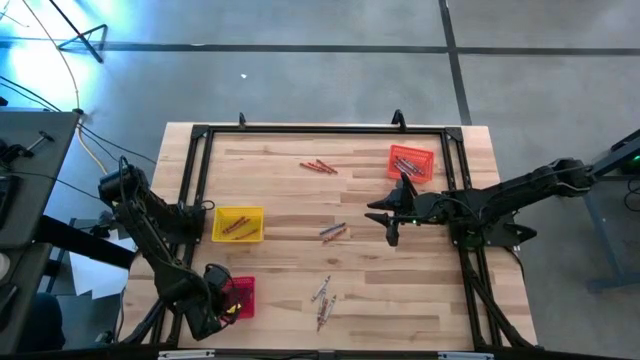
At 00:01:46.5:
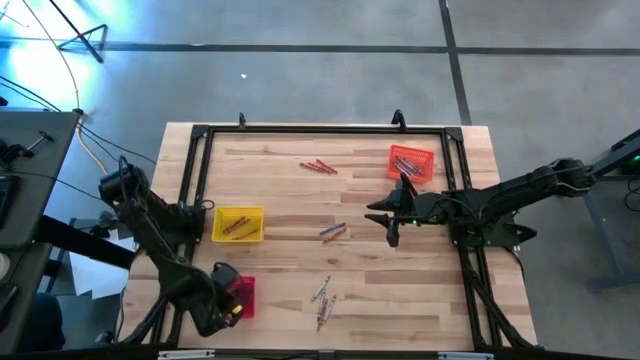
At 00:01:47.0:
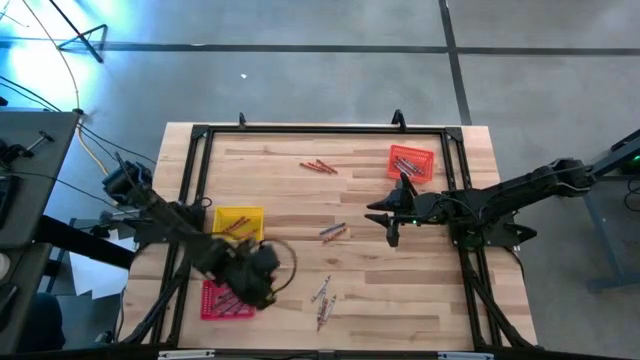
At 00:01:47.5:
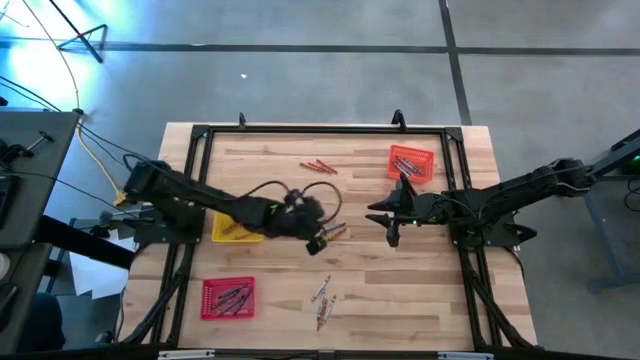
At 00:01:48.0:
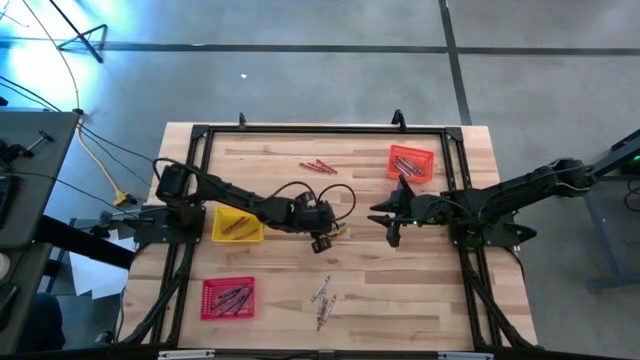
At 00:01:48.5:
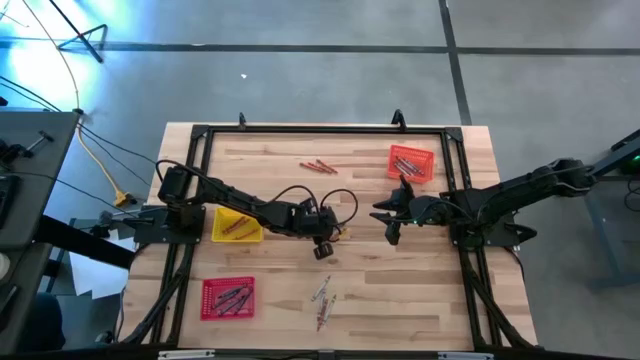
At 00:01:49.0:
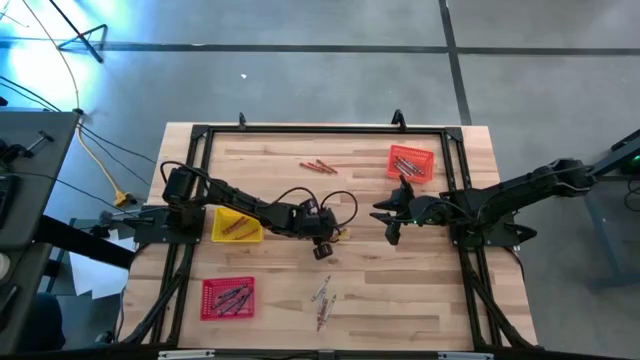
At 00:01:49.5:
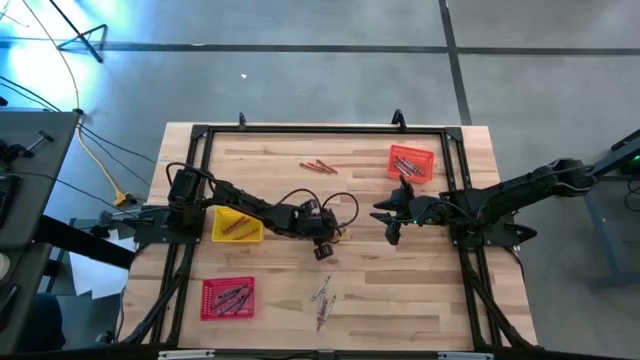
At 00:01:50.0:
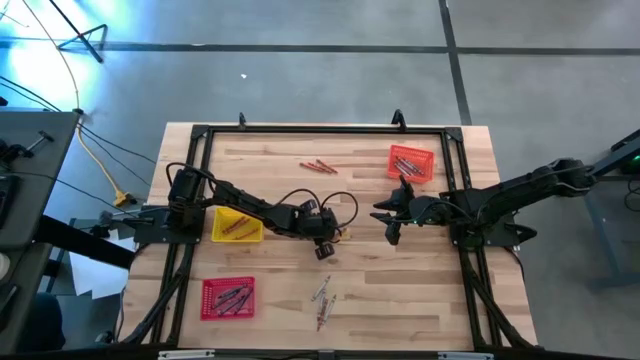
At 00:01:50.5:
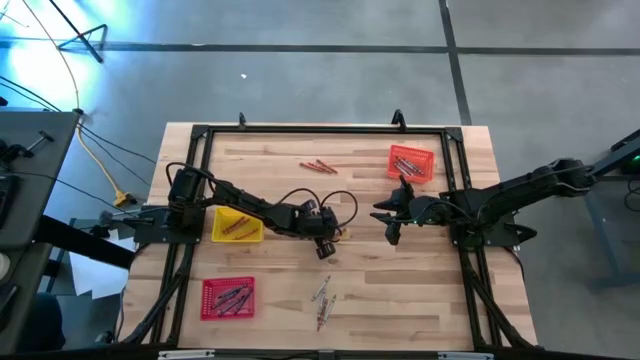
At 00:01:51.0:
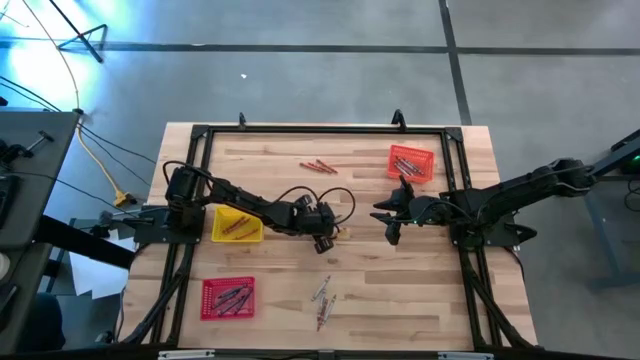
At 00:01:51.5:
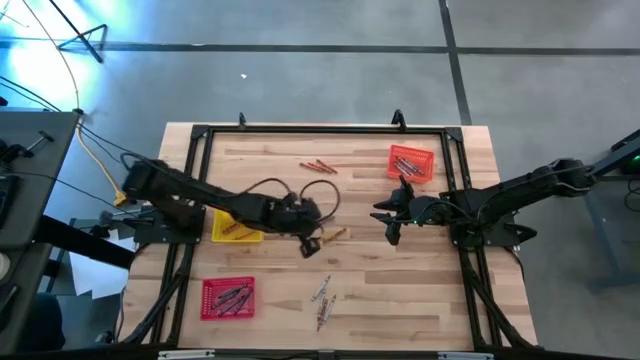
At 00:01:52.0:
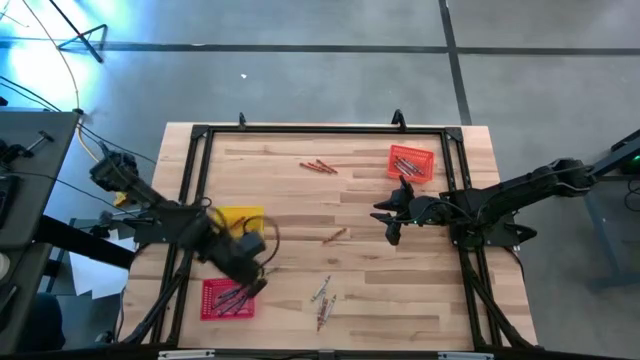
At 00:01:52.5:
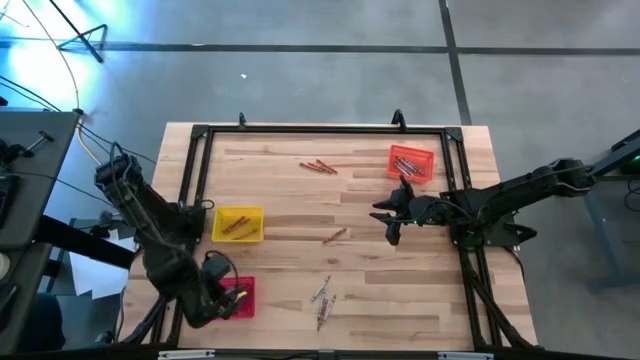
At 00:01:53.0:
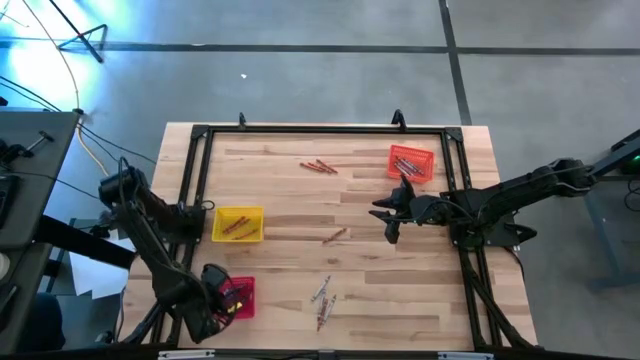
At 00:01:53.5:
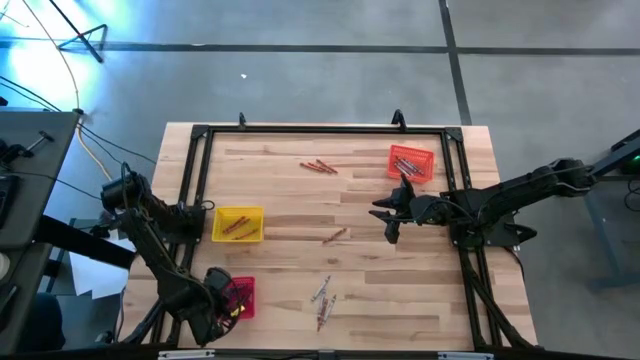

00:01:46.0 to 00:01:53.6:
Task: Sort crayons
Put the blue crayon into the red bin

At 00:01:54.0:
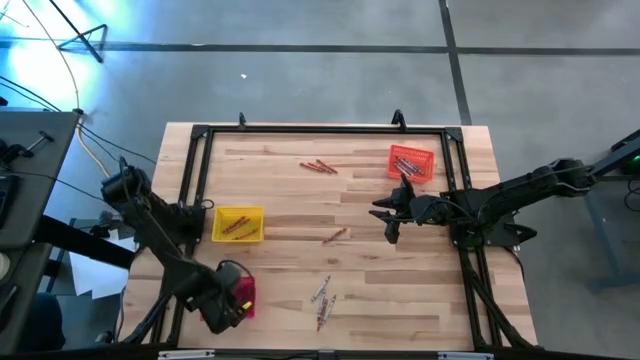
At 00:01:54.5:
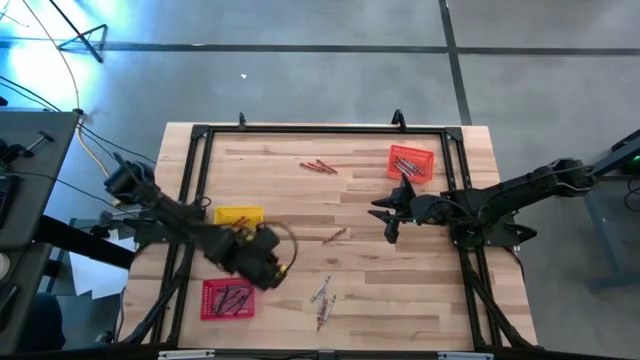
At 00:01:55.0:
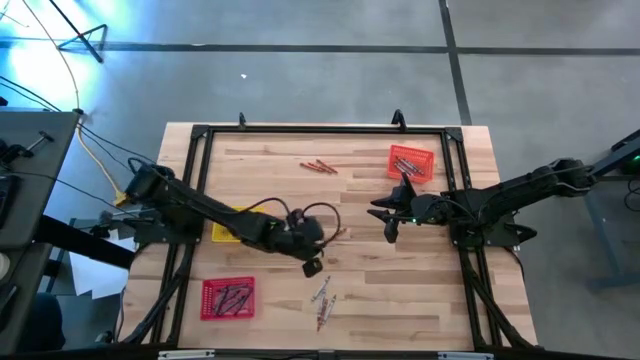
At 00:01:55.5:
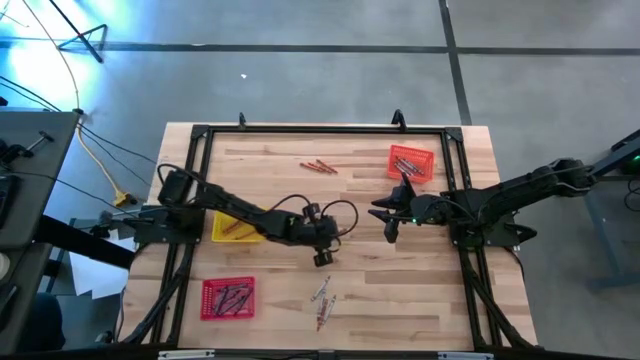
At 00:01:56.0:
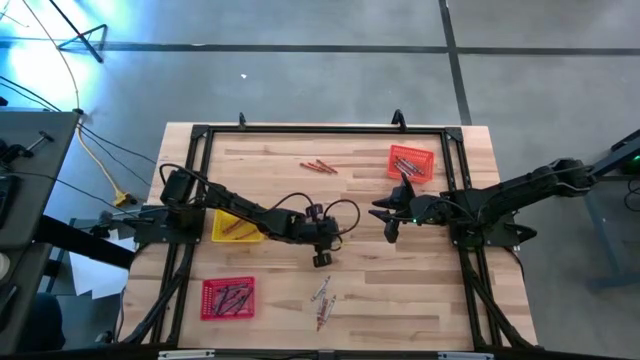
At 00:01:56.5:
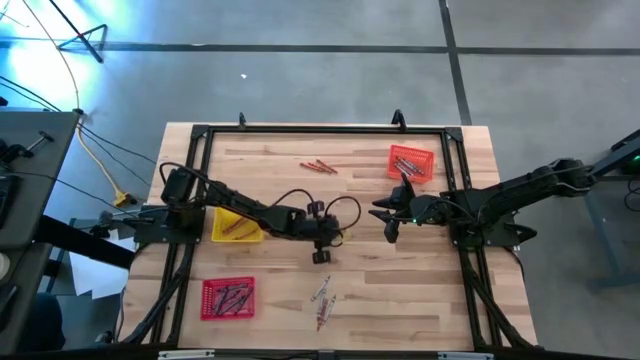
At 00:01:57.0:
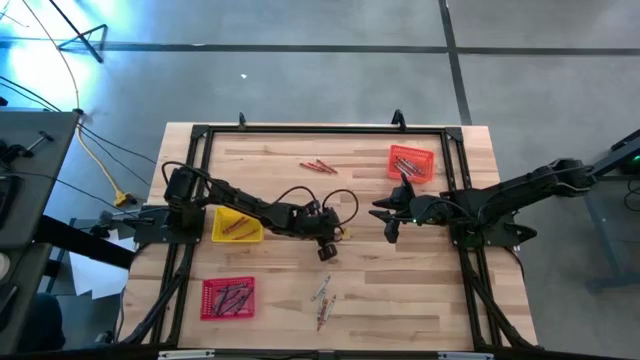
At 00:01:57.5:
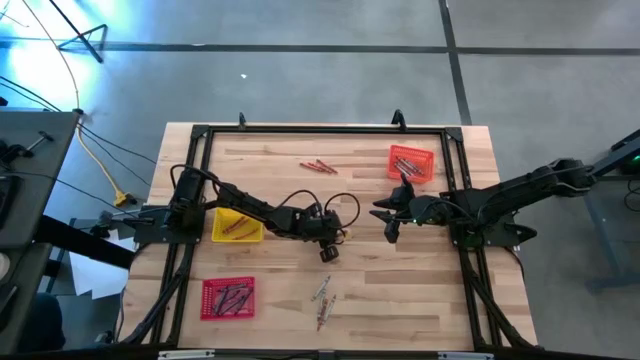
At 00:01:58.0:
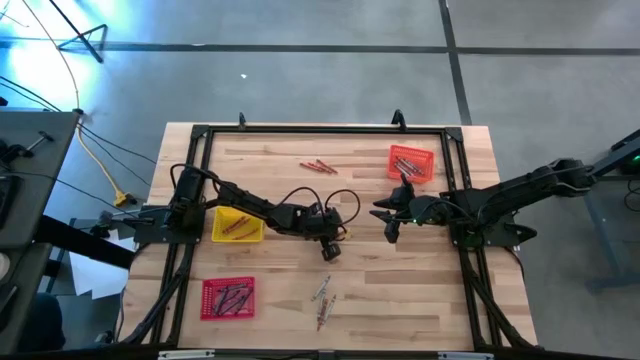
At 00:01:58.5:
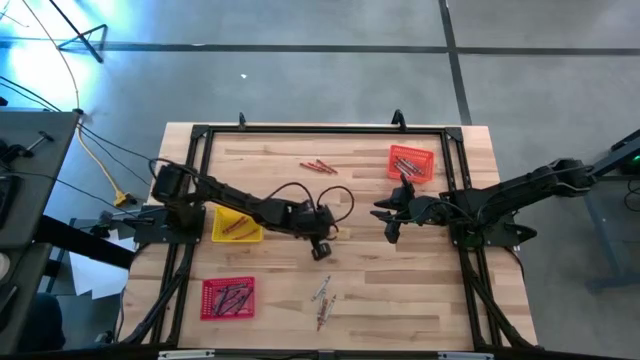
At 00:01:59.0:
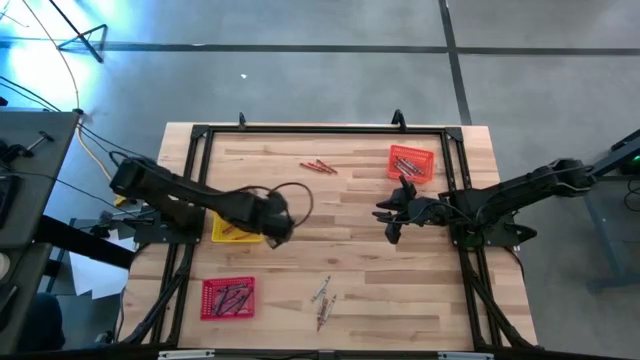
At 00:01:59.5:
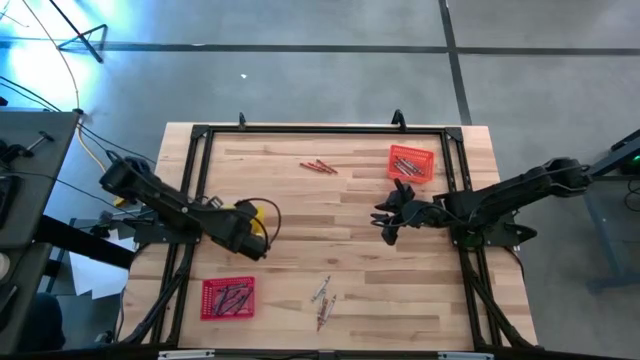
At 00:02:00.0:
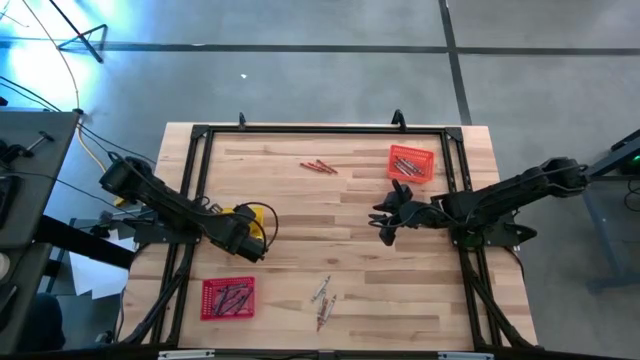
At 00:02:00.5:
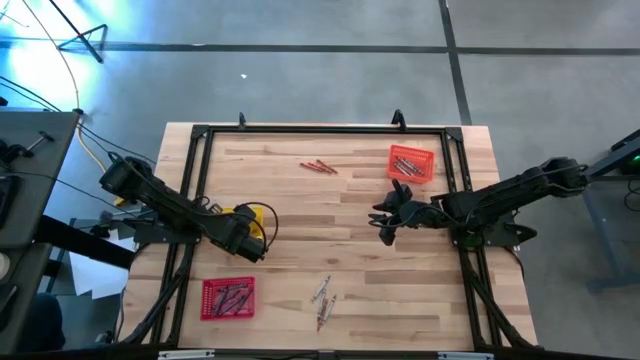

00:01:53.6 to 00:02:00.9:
Put the orange crayon into the yellow bin

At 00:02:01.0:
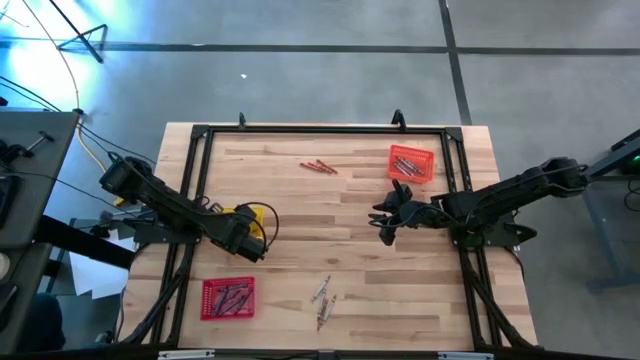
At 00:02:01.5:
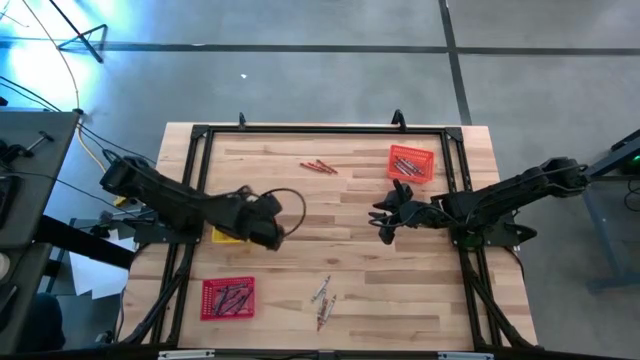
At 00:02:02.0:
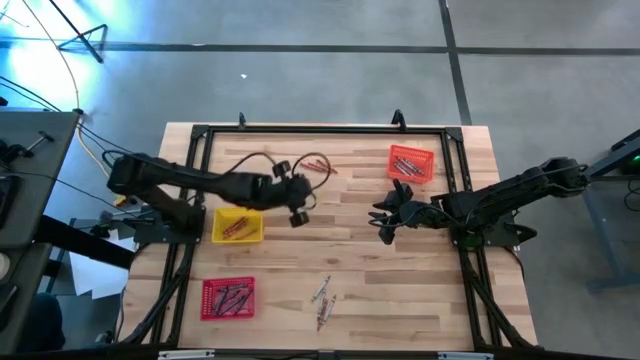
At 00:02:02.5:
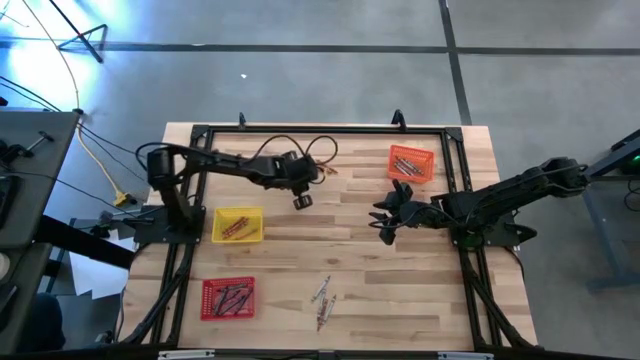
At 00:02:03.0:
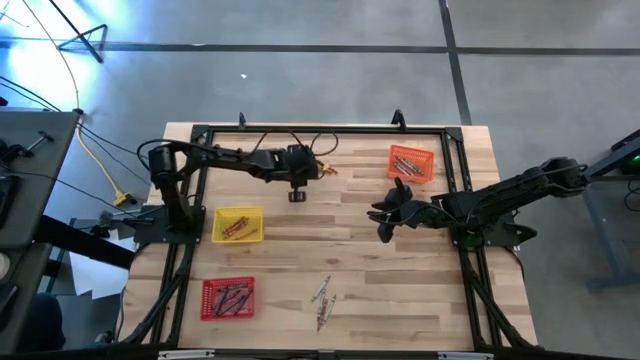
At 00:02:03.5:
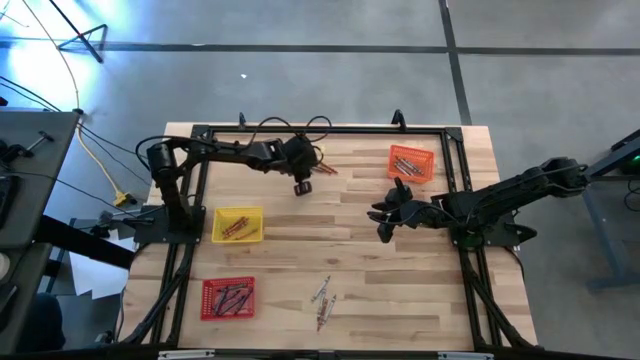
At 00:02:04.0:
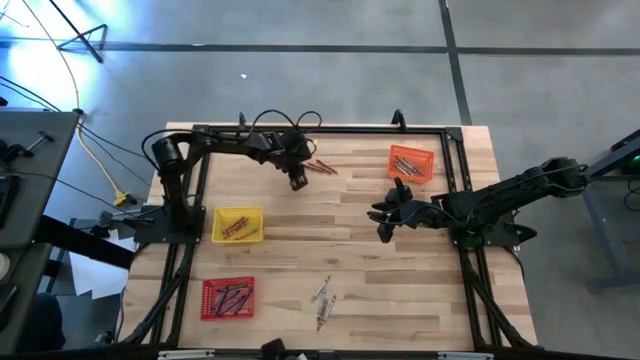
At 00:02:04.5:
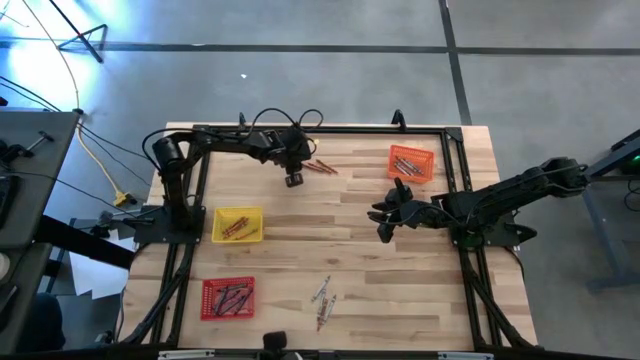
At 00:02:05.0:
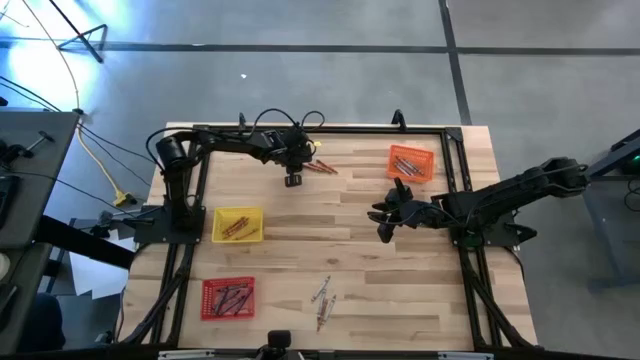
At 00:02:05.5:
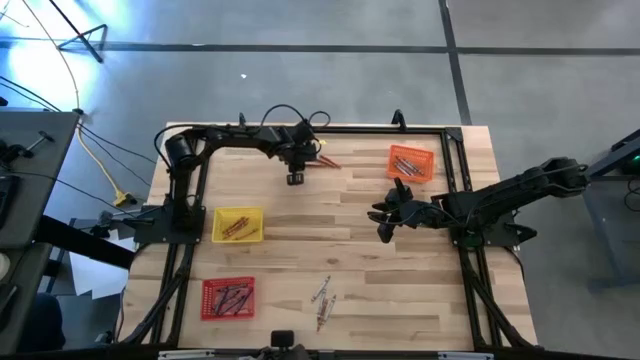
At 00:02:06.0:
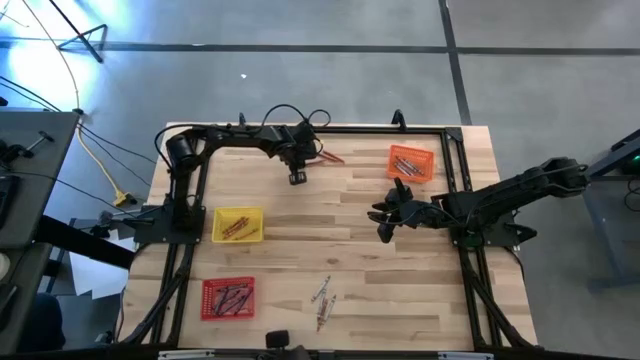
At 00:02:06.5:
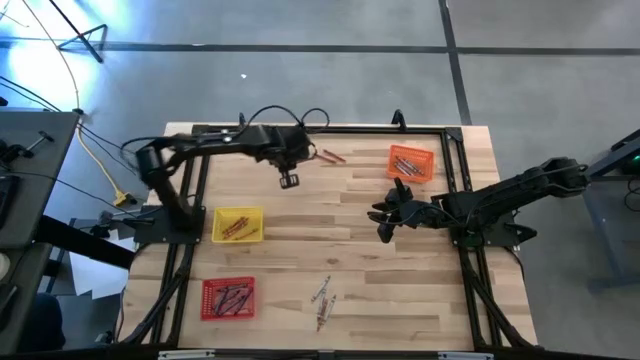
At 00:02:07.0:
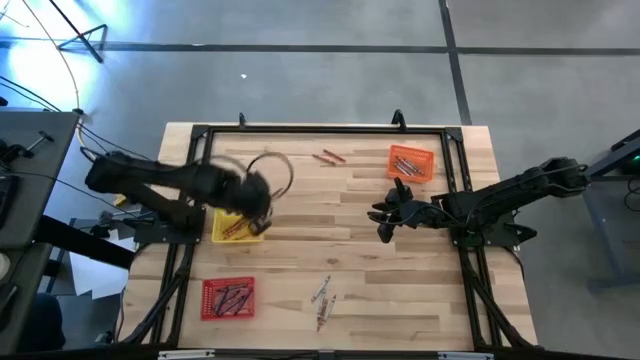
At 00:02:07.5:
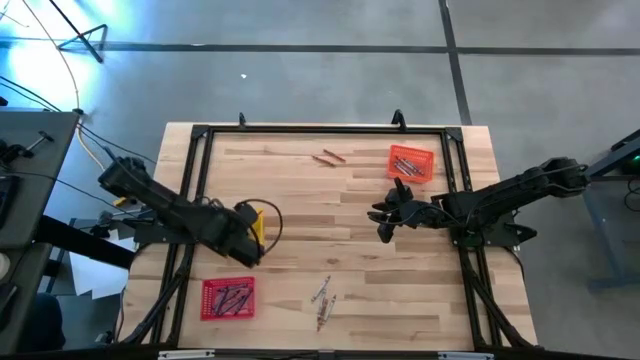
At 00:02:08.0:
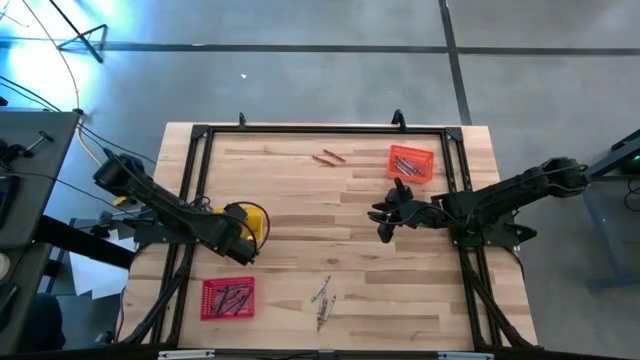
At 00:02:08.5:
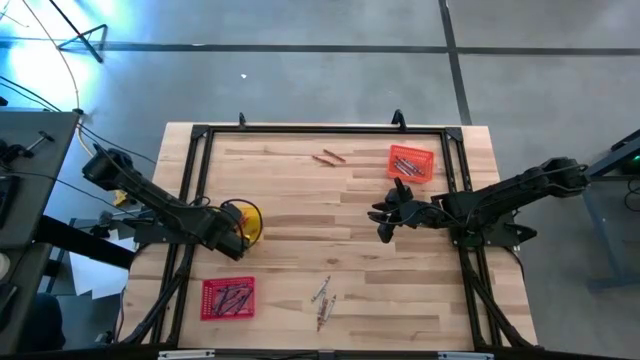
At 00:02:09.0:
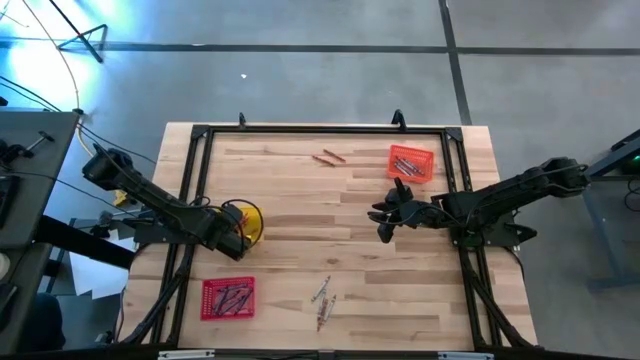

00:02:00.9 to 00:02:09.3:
Put the orange crayon into the yellow bin
